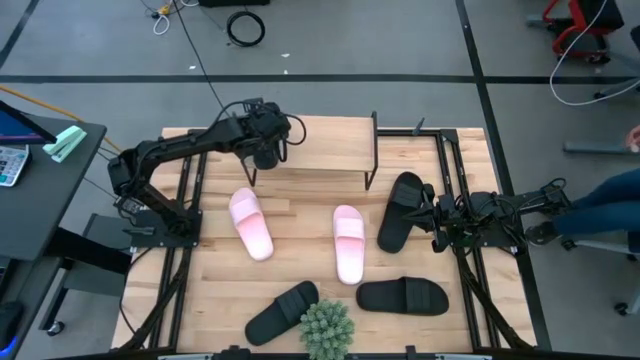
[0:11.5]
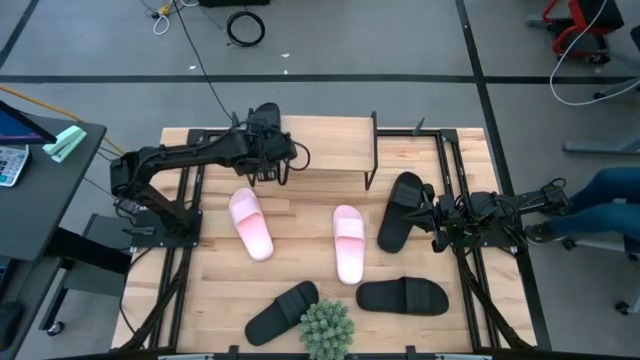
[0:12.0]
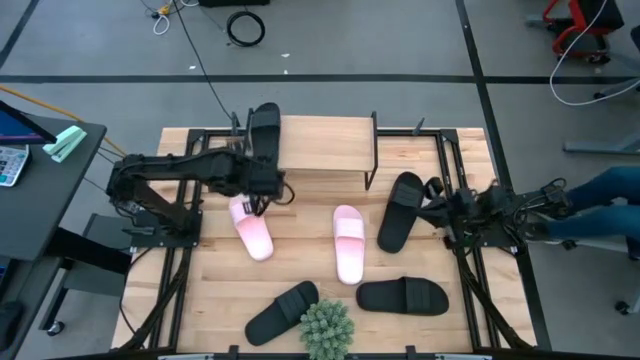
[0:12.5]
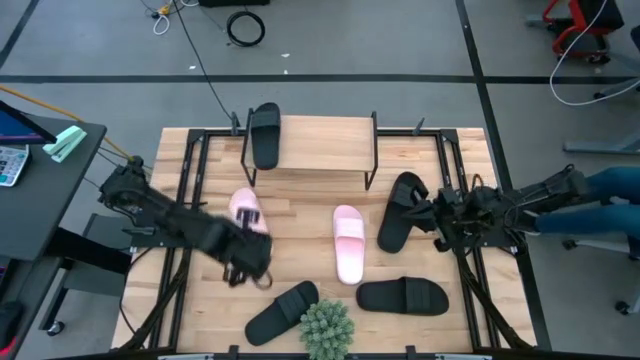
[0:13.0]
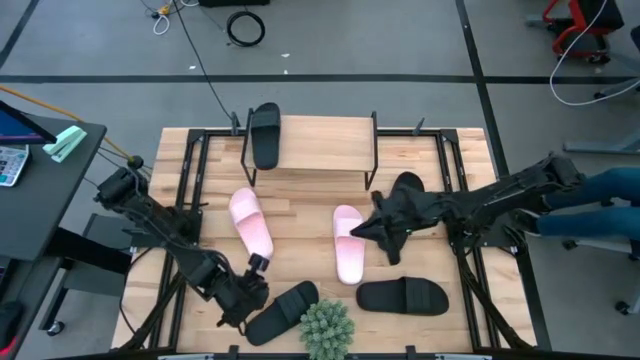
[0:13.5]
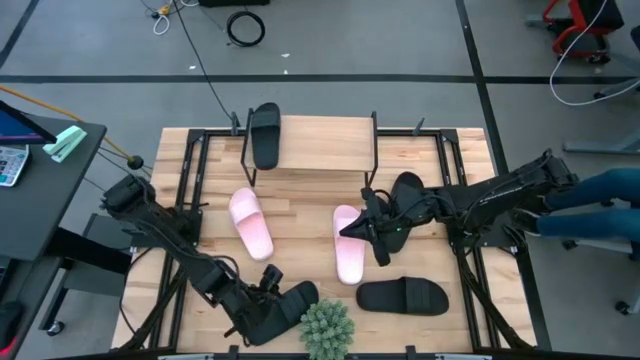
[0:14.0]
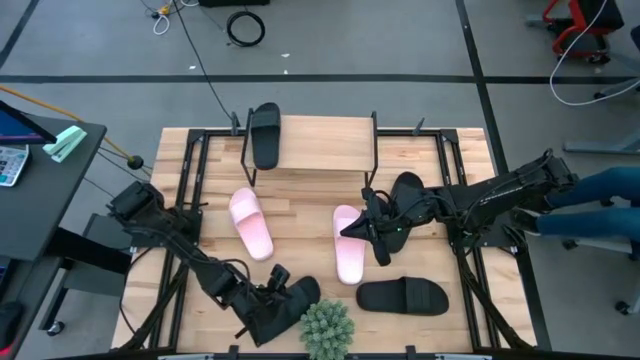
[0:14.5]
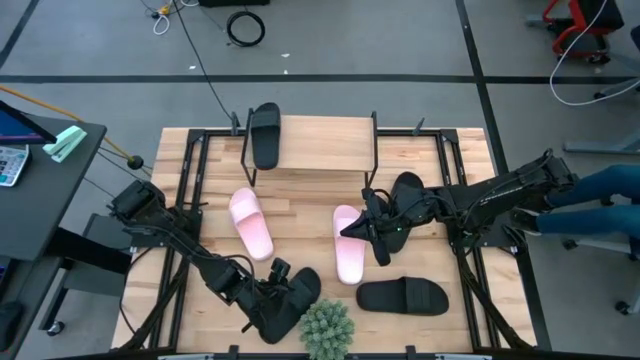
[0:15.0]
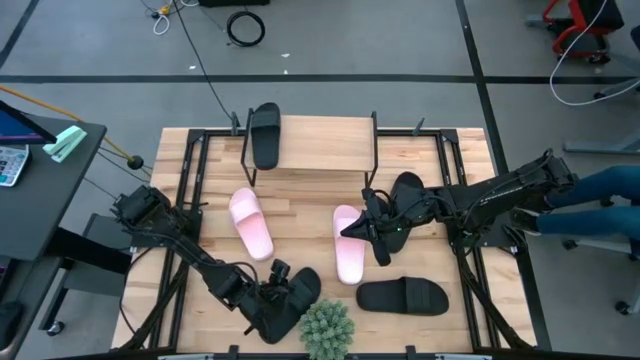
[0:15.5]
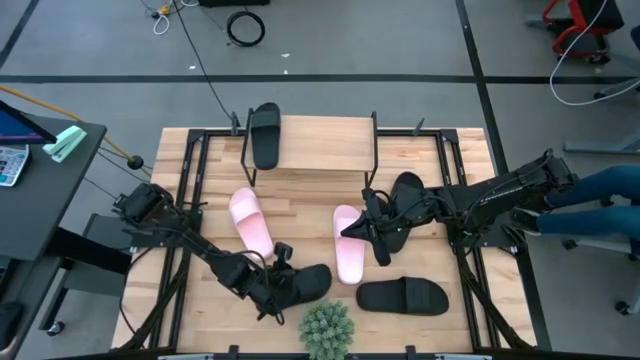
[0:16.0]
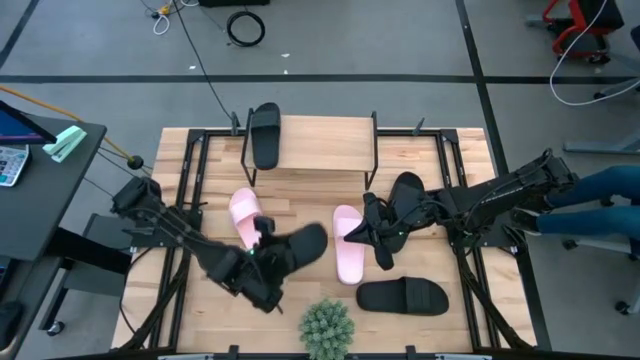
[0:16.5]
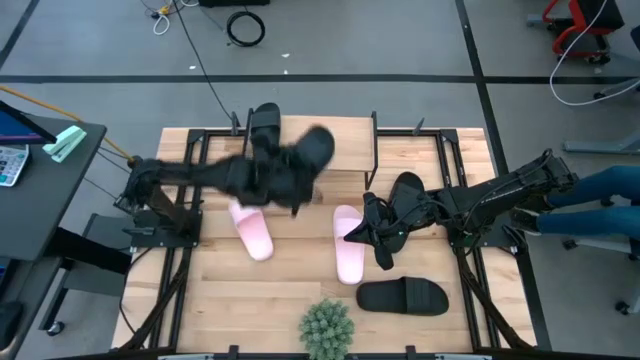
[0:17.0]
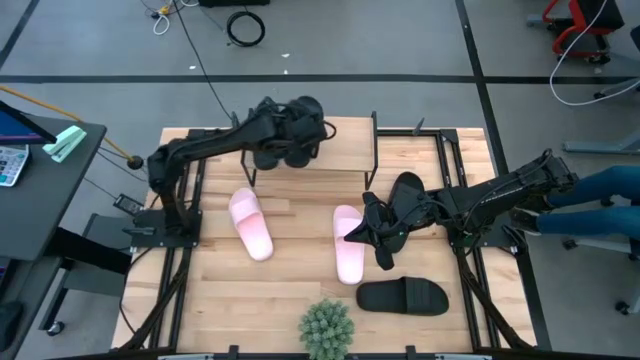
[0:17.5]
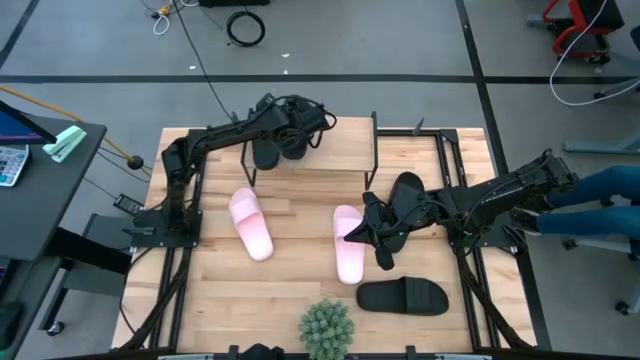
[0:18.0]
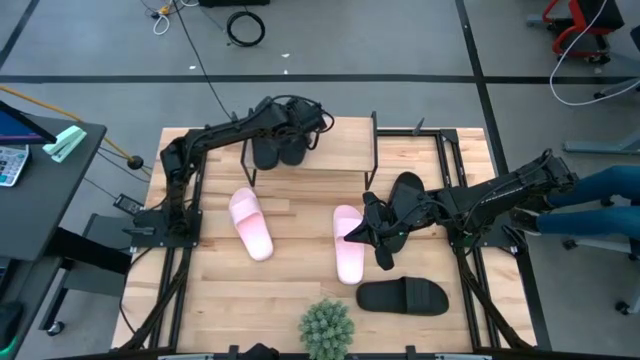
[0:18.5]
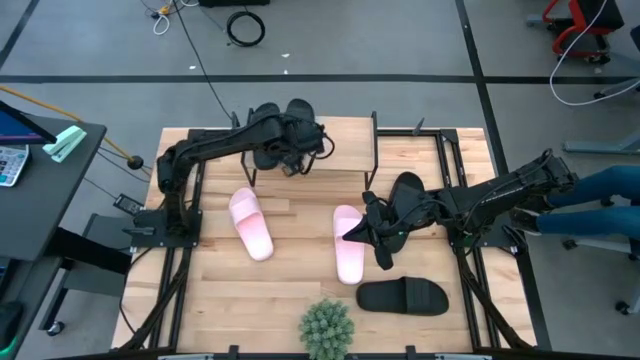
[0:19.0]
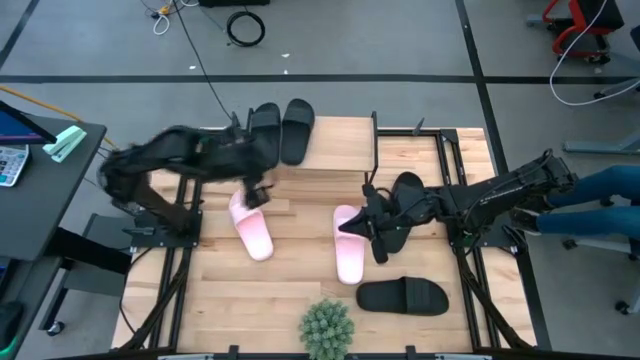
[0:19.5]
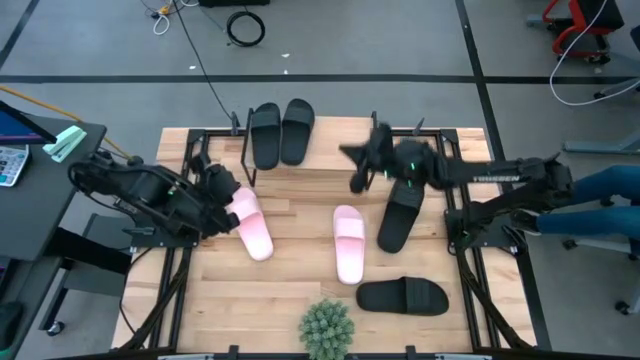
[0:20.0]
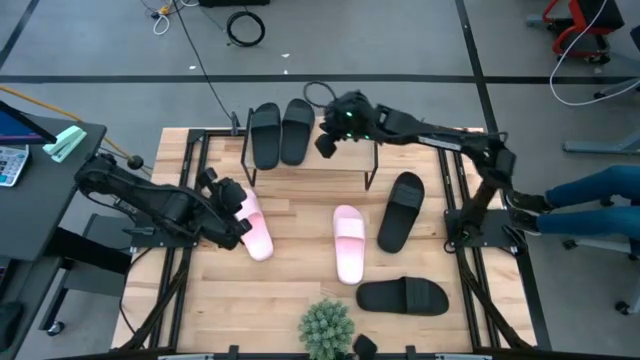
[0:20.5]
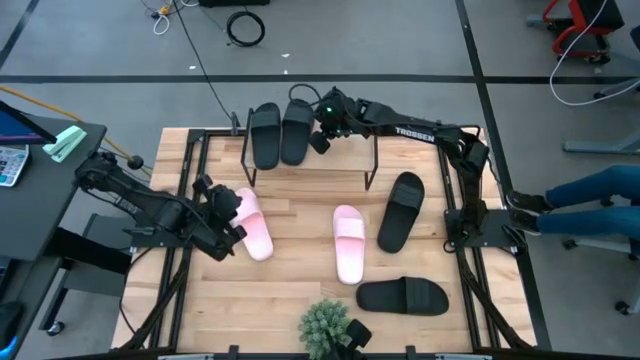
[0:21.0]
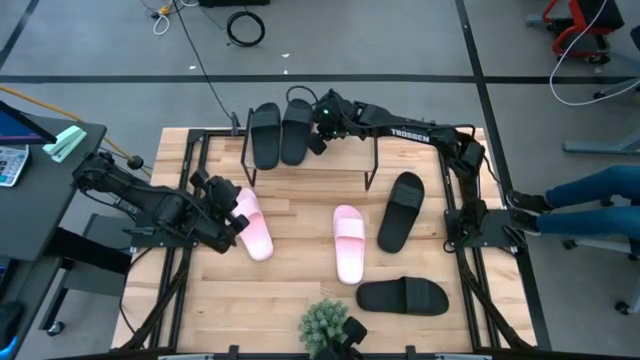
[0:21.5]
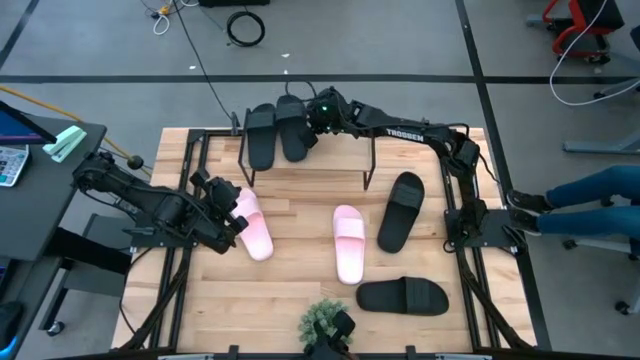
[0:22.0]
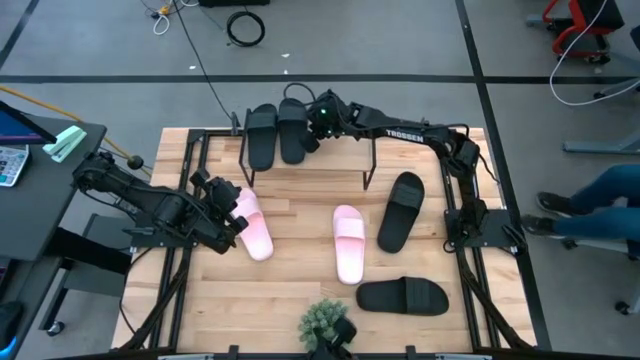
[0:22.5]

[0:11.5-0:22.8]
Task: Pick and place slides into the shelf
Put the black slides on the shelf

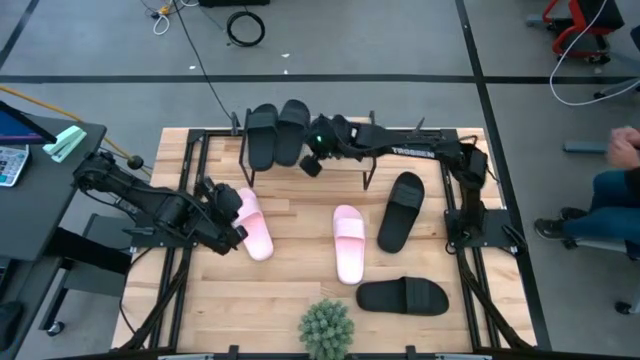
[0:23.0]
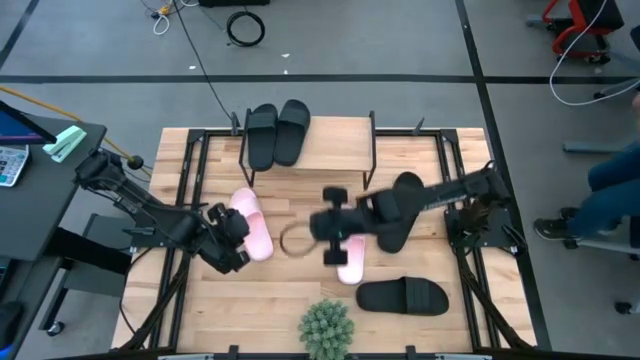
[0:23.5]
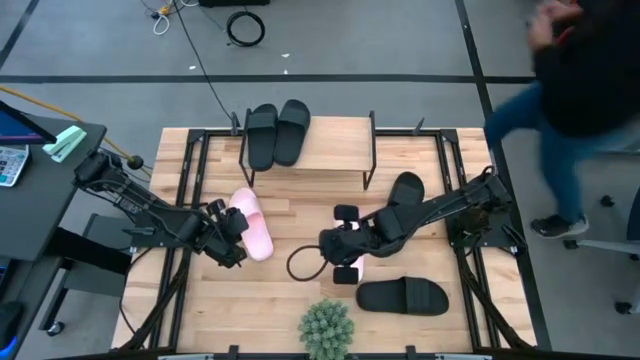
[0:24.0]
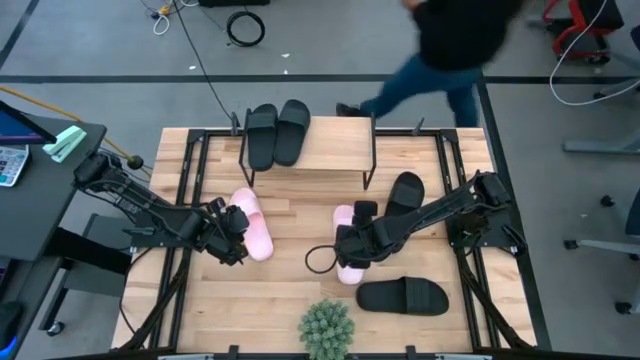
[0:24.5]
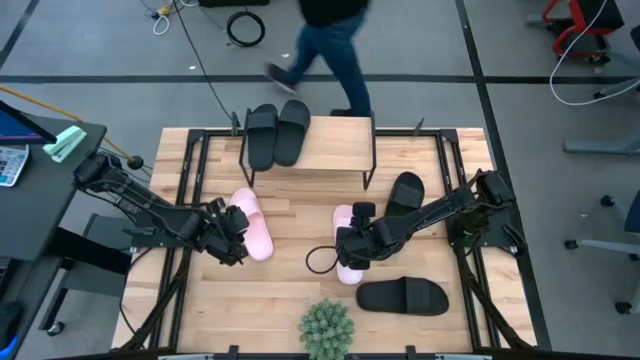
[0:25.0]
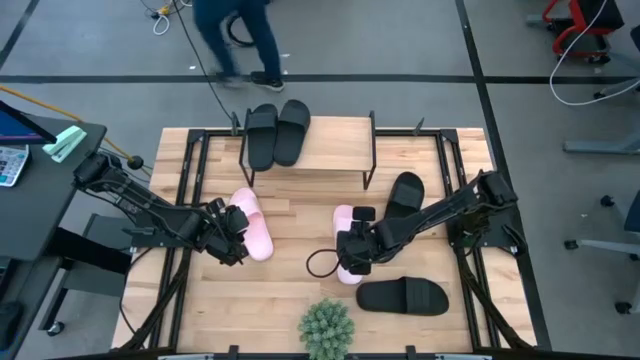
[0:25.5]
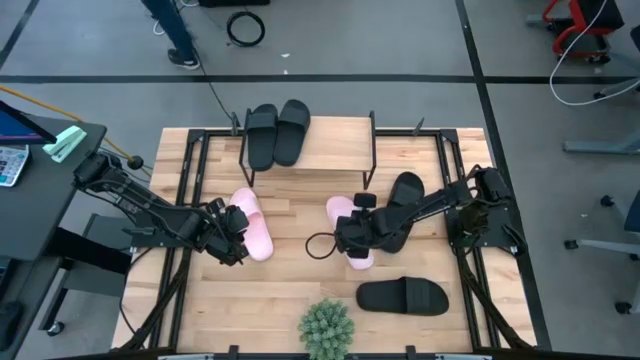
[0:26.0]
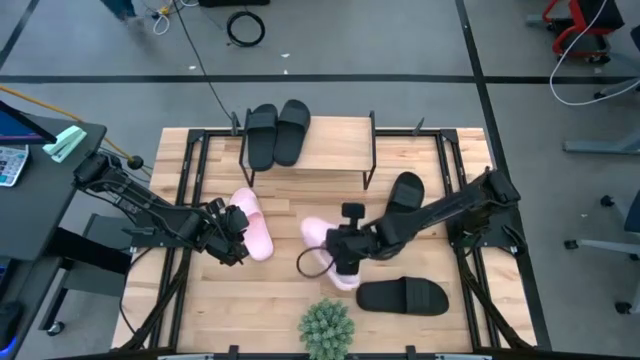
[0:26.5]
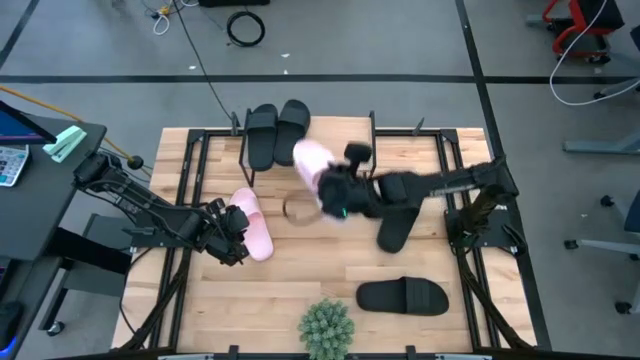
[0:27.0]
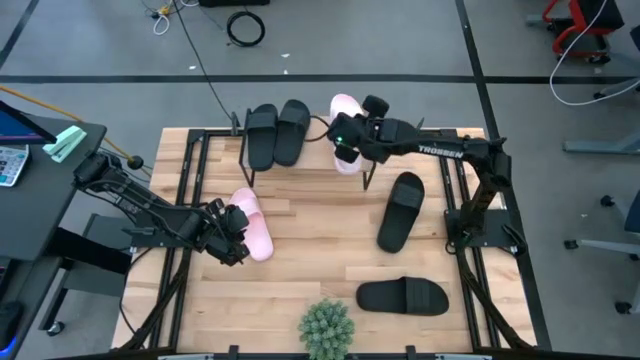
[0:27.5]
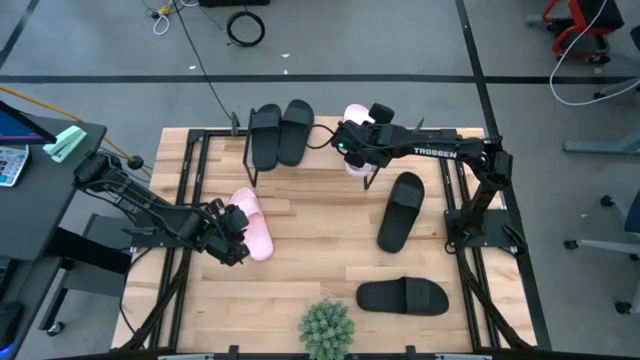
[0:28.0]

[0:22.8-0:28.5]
Put the pink slides on the shelf

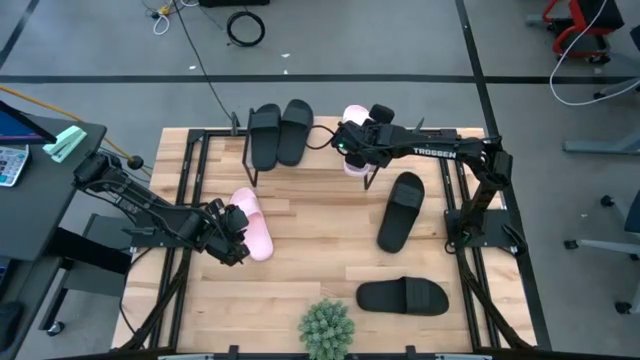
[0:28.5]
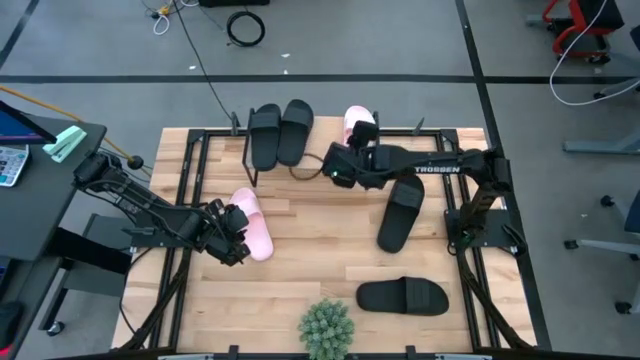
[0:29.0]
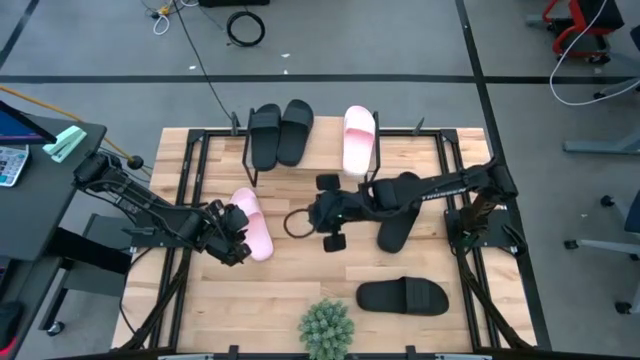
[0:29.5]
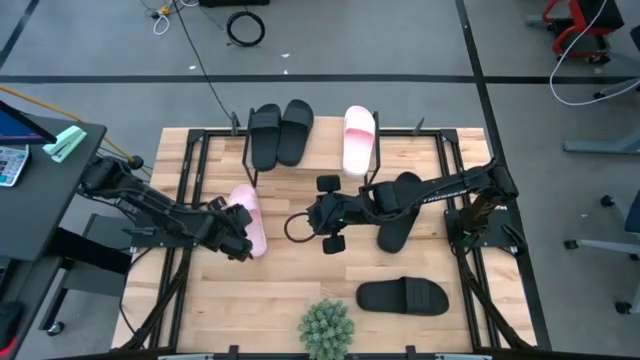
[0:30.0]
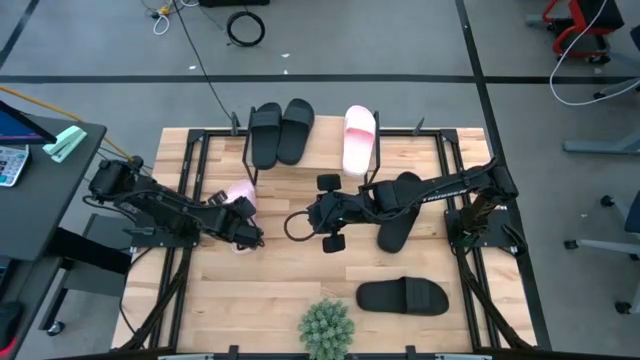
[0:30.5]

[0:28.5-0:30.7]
Put the pink slides on the shelf

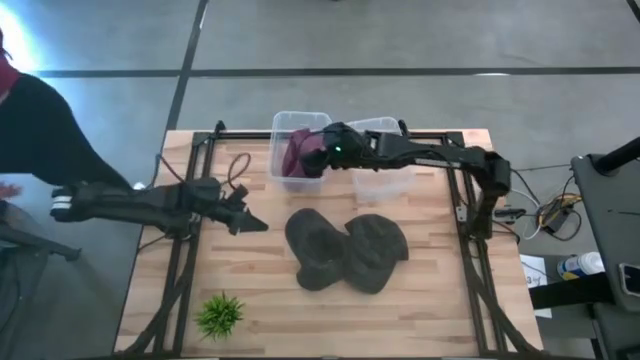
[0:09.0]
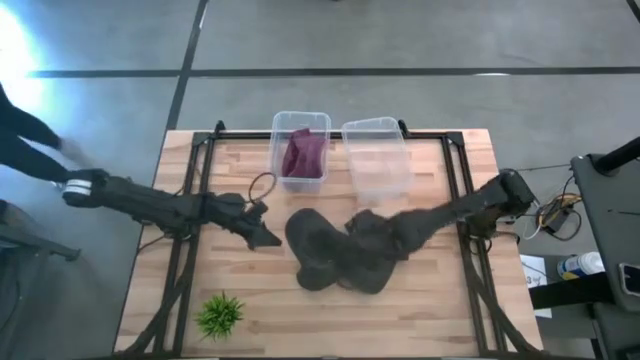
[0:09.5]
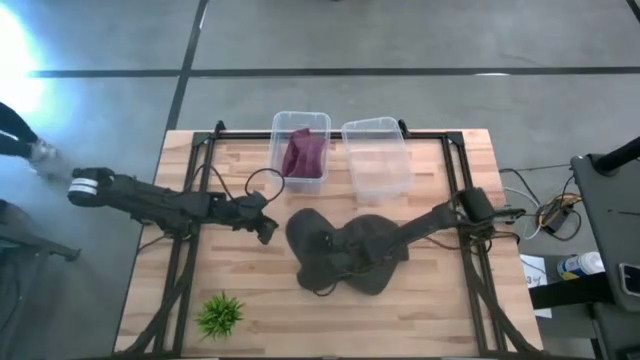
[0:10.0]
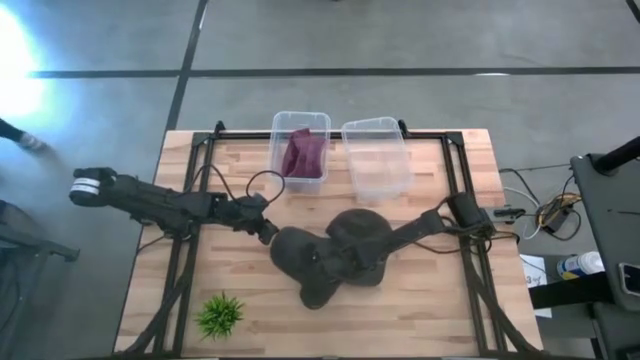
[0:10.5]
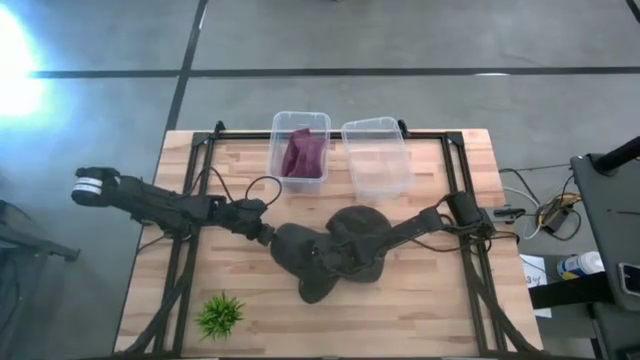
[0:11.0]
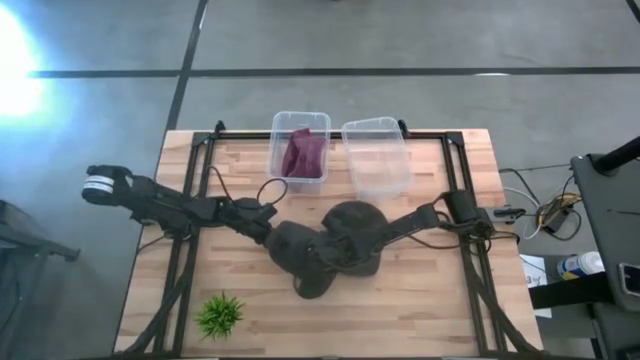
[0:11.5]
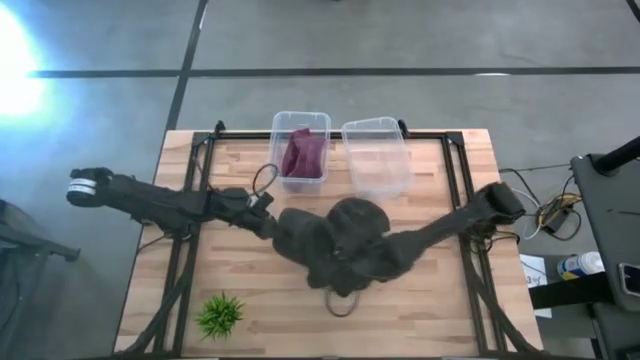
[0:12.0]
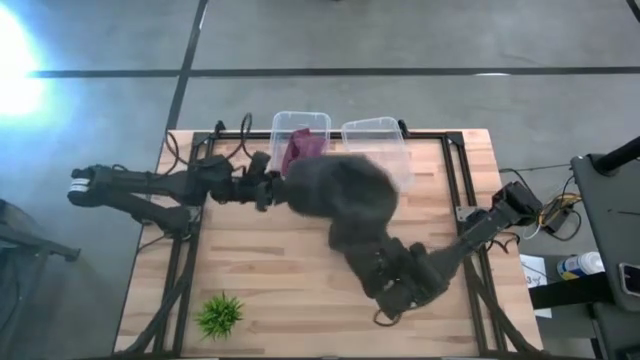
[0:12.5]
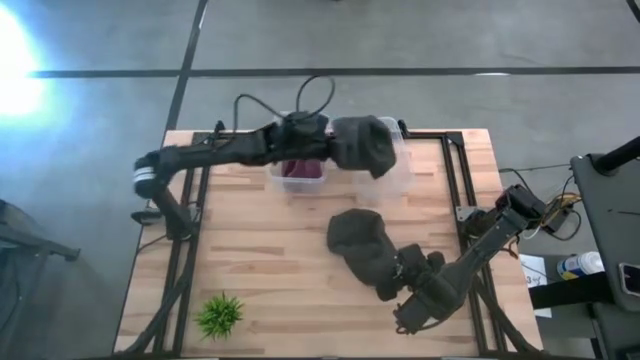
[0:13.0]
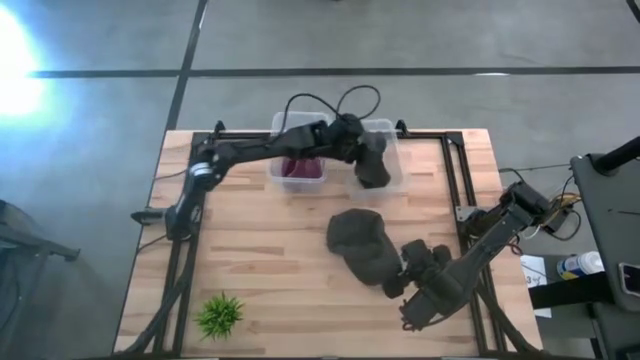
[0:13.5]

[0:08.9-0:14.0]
Task: Pick & Place hat
Put the left black cap into the right transparent bin
